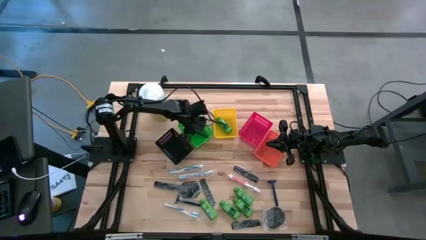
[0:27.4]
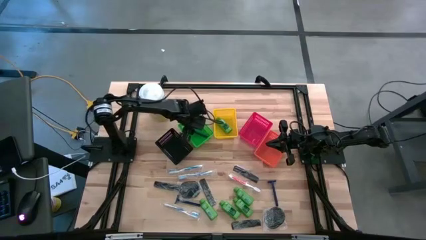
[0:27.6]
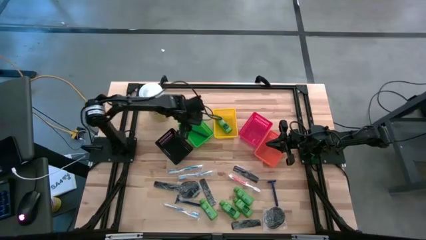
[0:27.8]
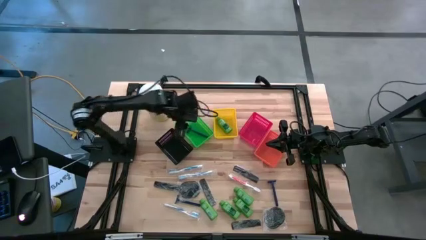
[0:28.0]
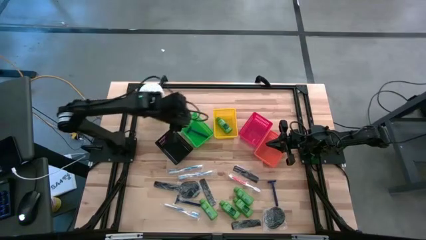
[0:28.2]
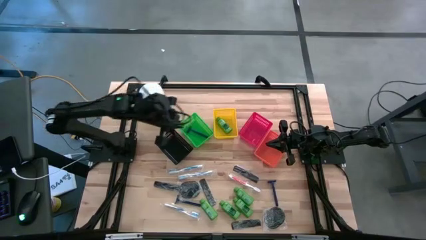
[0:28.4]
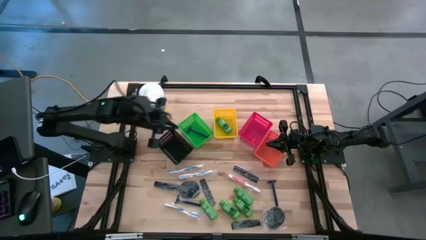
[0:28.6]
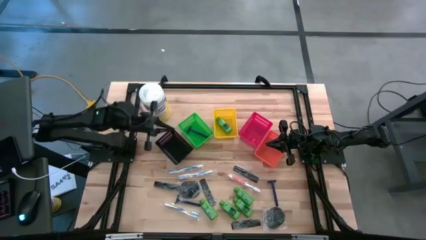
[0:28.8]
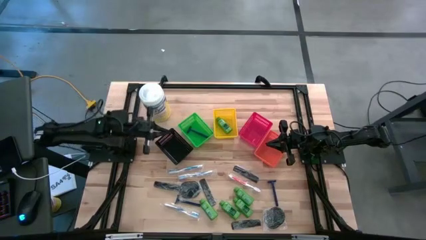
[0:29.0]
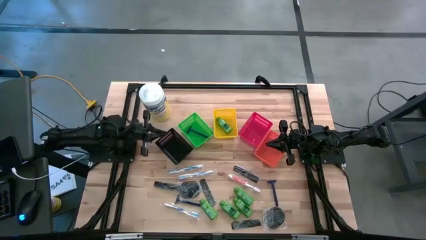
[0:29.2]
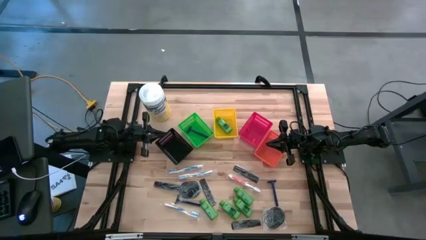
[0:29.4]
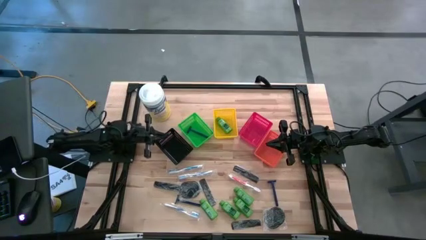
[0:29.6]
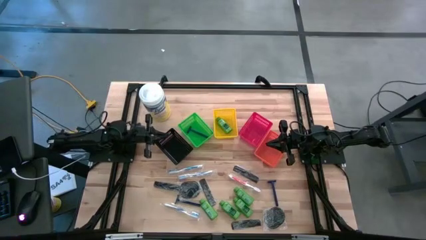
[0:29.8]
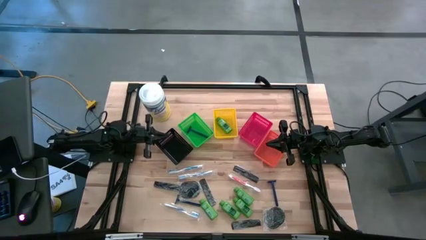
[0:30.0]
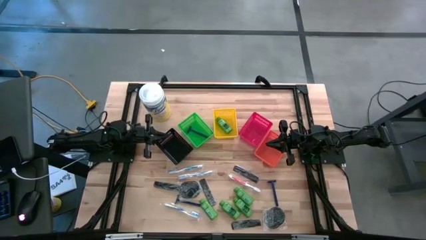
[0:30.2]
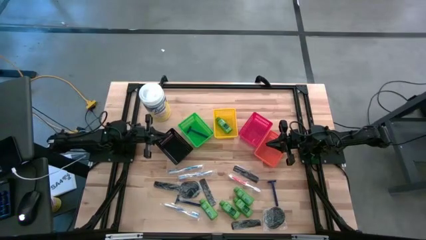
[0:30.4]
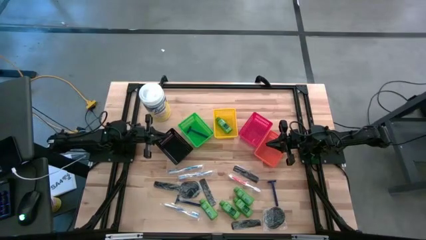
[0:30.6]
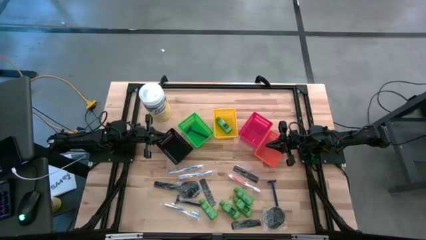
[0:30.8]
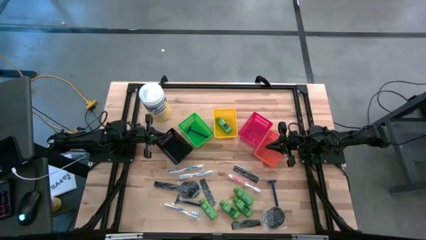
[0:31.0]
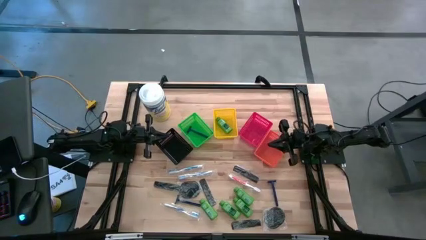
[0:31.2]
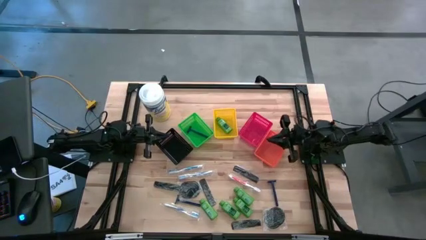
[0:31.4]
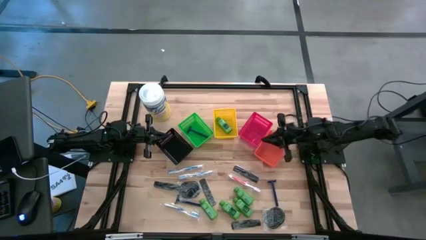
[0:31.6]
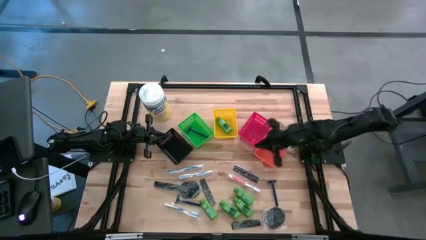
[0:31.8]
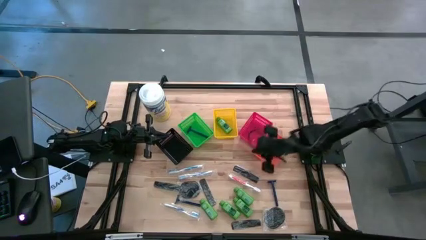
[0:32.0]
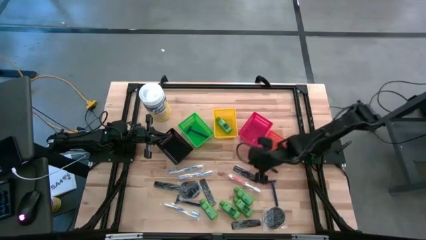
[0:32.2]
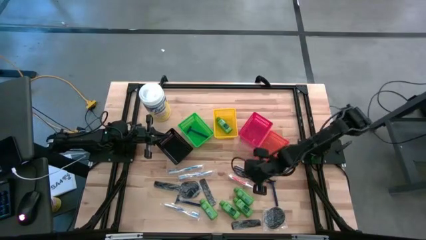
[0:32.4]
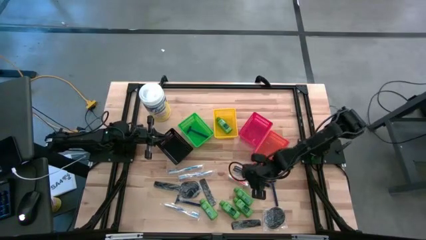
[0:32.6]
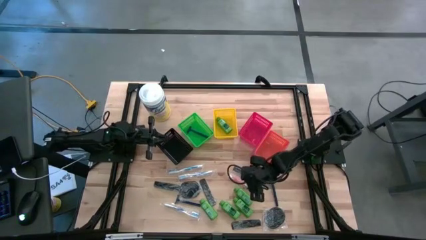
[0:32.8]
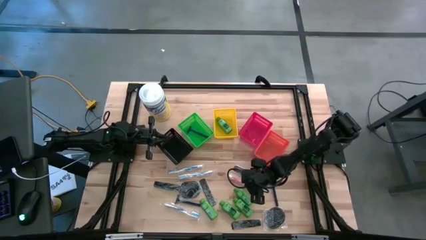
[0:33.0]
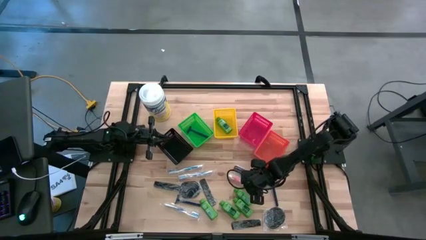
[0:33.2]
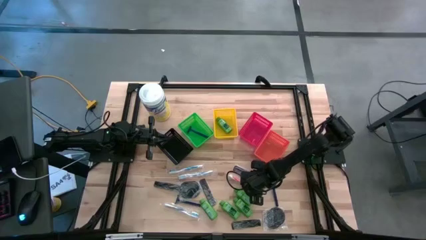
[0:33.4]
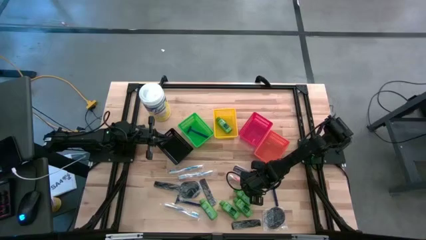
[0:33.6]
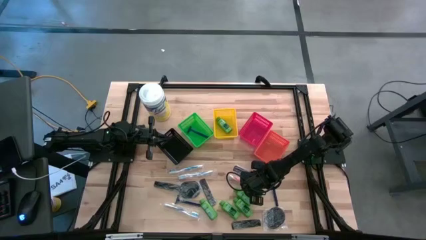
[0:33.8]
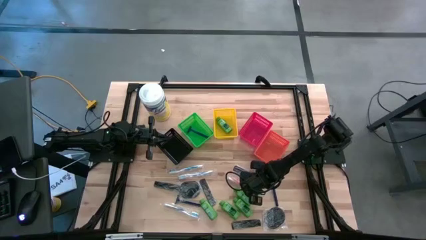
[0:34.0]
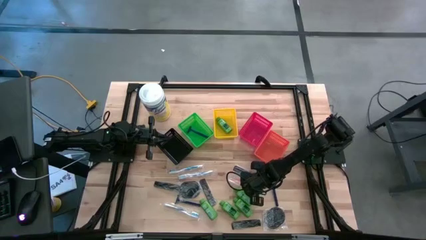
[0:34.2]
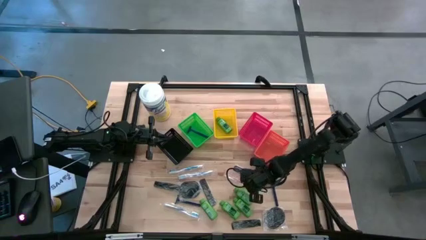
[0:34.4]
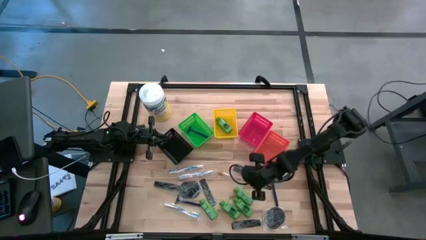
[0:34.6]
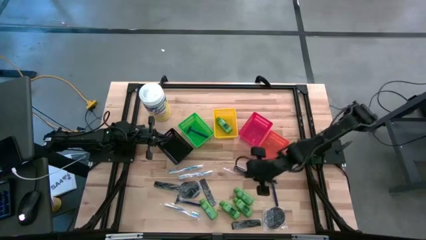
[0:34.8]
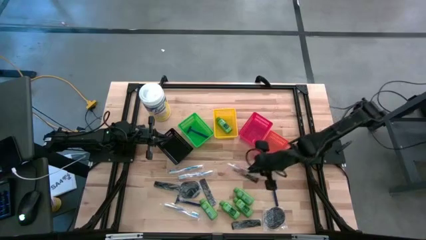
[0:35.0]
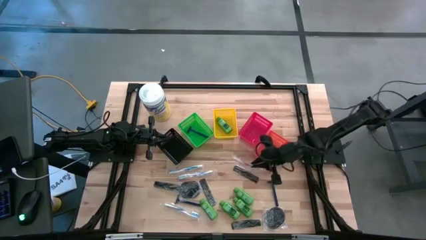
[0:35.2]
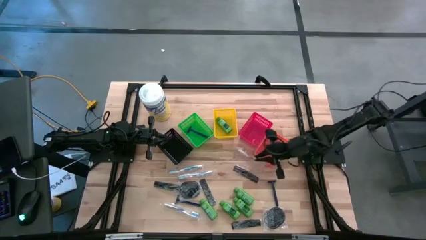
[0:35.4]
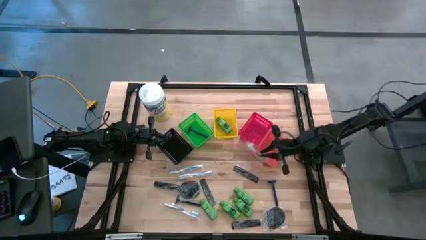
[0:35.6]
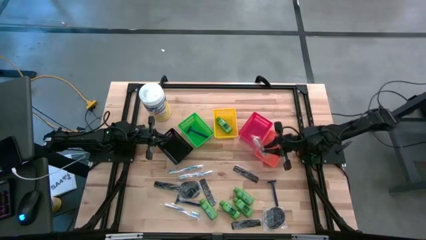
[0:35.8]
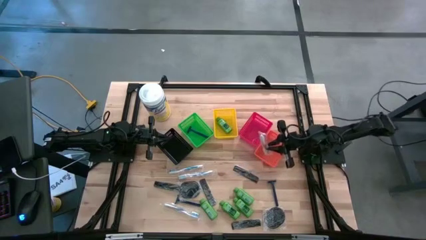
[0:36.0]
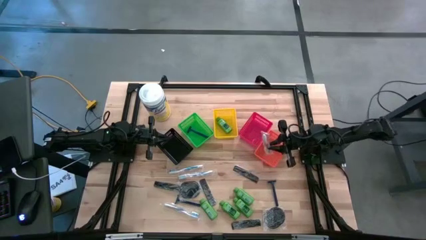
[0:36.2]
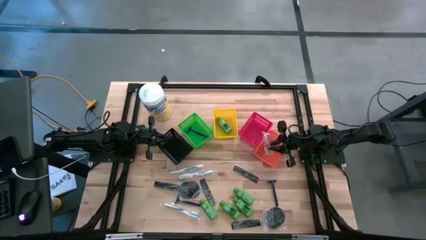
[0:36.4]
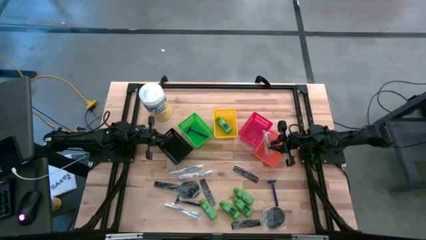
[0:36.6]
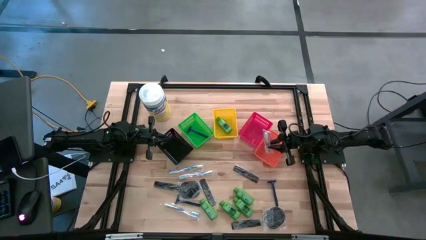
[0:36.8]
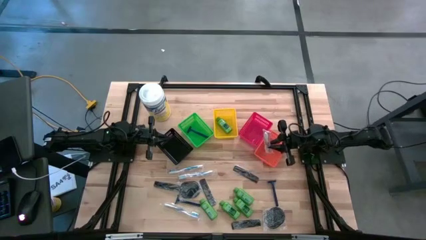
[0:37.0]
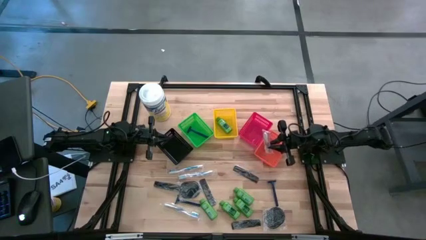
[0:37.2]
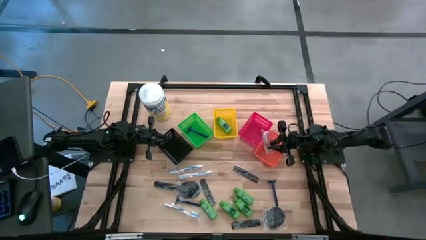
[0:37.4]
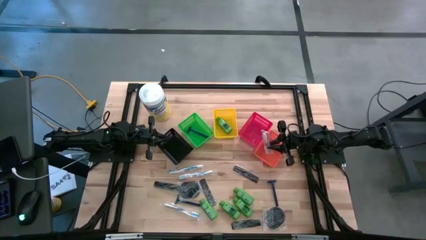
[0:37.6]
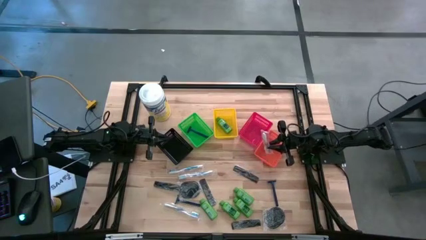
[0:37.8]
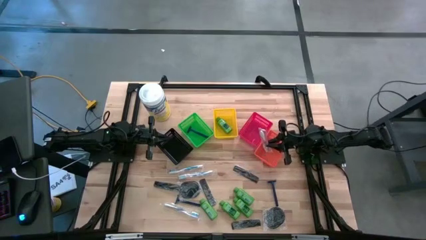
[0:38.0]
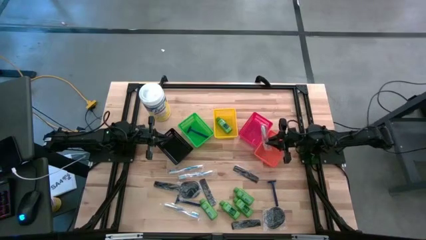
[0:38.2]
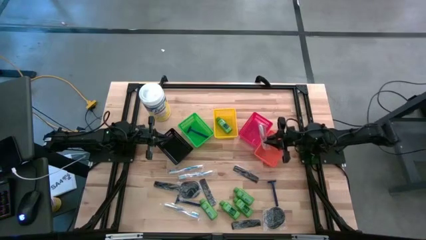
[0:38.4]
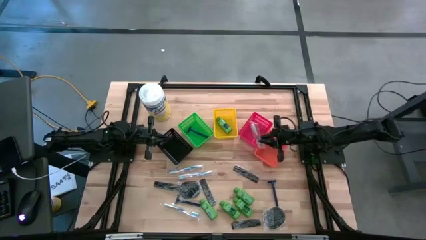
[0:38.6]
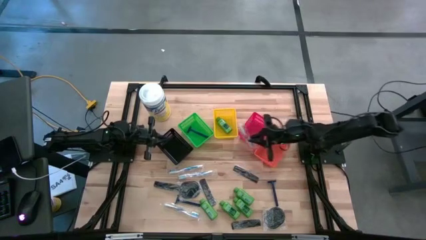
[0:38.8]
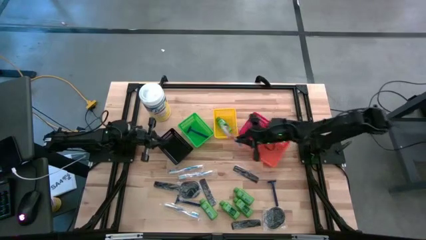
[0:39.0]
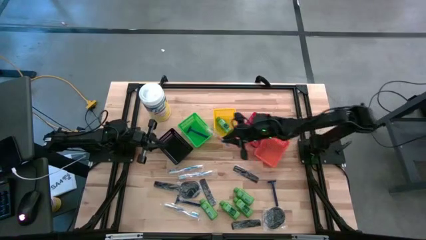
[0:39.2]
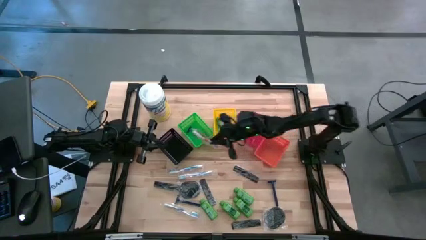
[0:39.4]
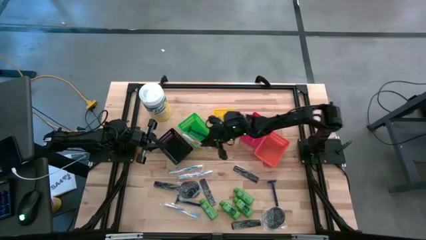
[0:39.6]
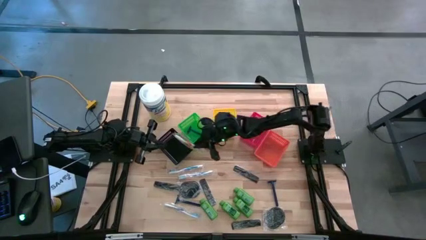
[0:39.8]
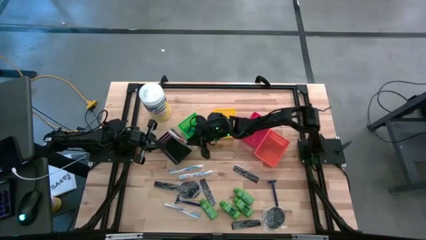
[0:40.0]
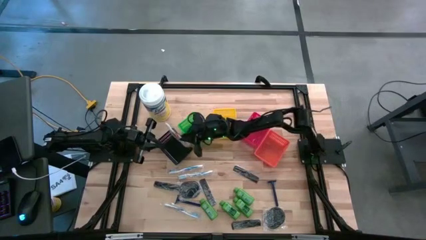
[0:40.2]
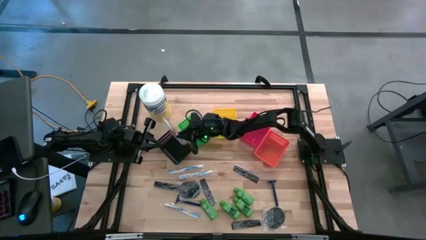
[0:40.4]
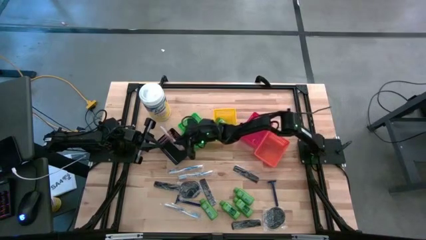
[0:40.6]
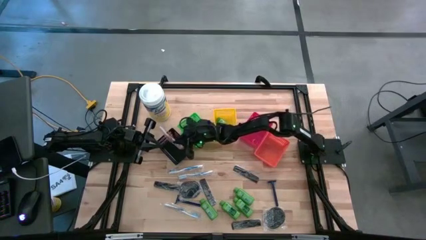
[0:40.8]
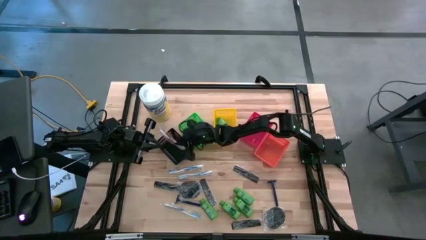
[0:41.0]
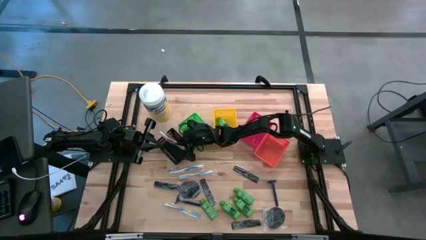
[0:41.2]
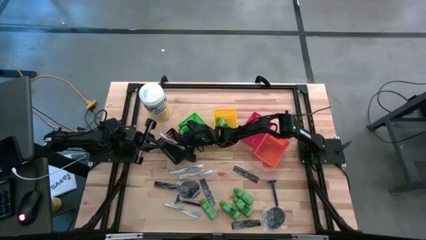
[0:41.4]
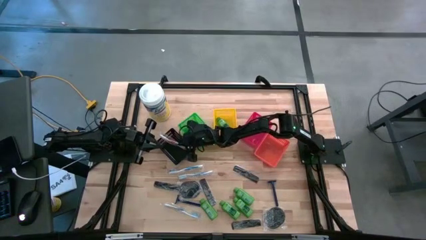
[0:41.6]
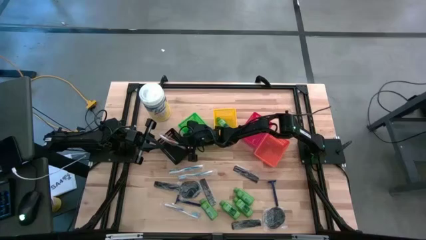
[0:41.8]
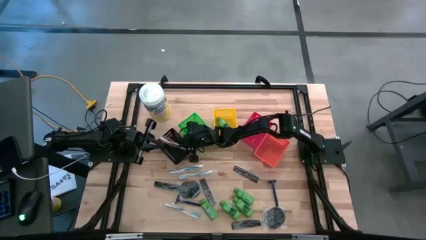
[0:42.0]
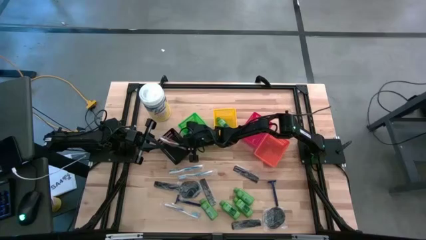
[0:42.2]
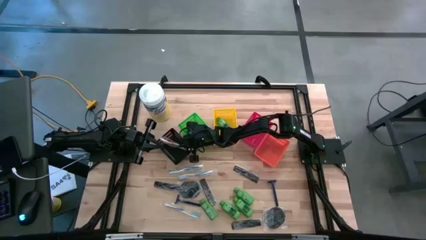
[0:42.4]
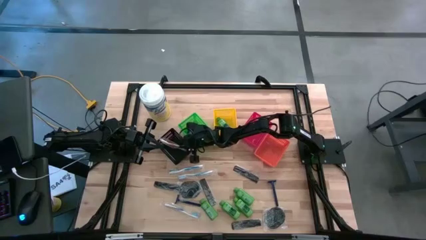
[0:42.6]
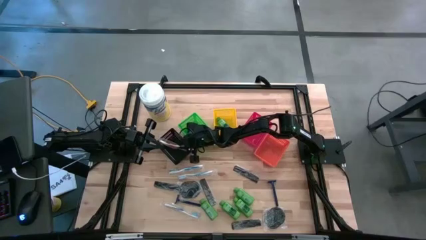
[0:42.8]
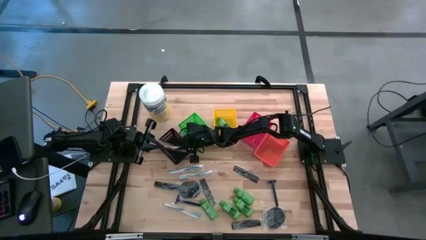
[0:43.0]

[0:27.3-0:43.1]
Task: Pick & Place Travel size toiletries
Put the orange toothbrush into the black bin
